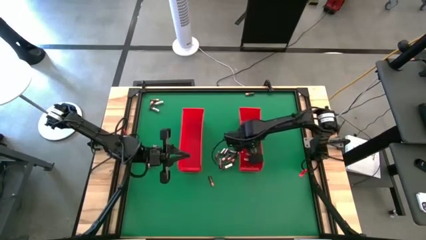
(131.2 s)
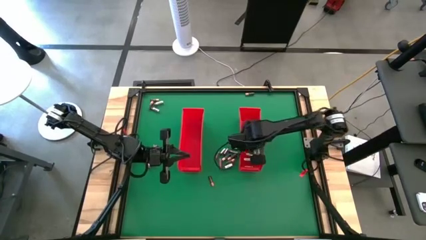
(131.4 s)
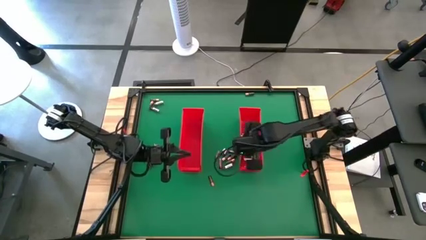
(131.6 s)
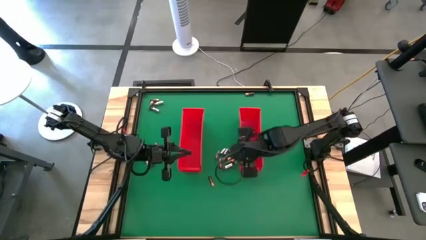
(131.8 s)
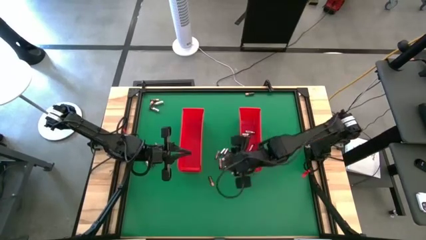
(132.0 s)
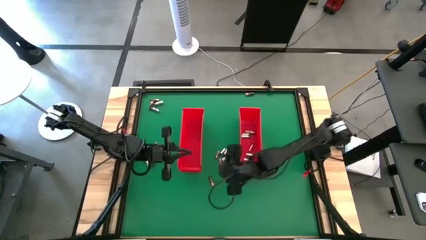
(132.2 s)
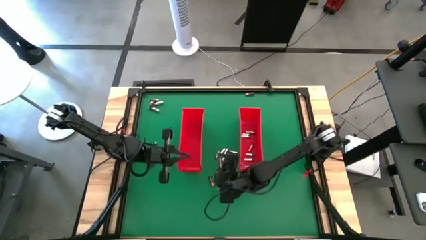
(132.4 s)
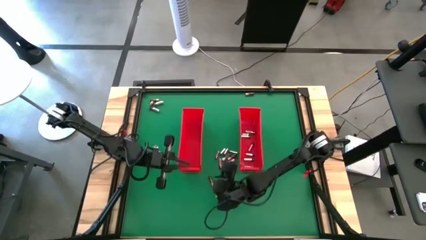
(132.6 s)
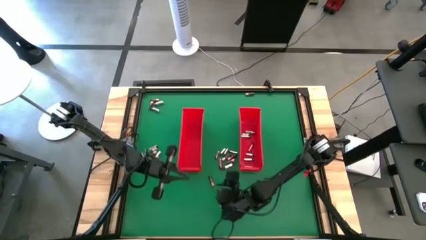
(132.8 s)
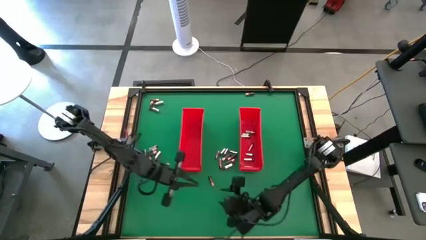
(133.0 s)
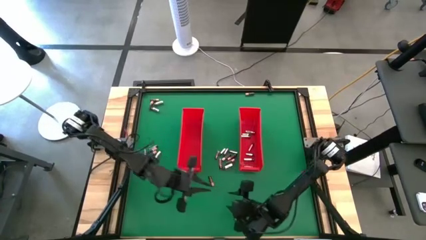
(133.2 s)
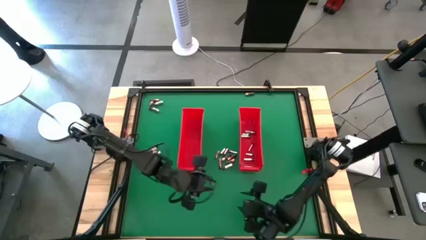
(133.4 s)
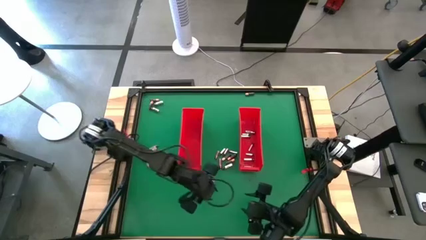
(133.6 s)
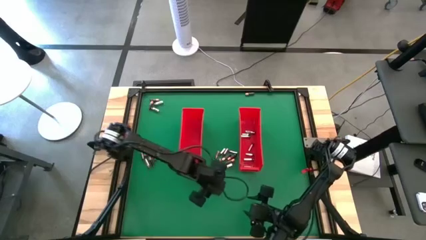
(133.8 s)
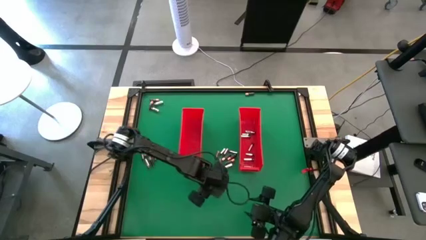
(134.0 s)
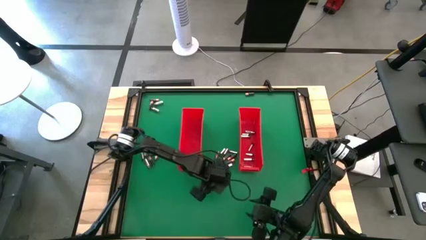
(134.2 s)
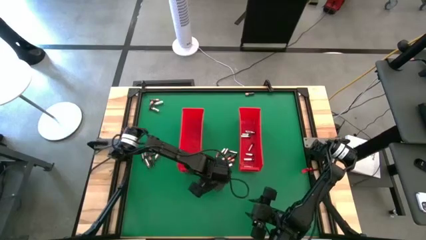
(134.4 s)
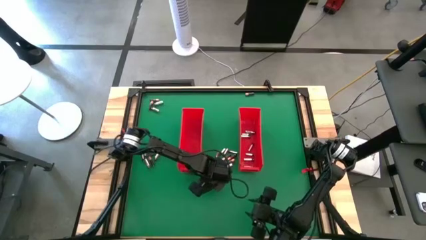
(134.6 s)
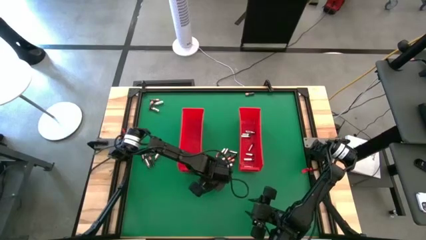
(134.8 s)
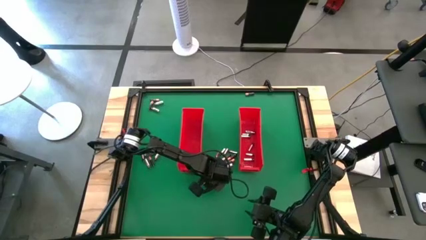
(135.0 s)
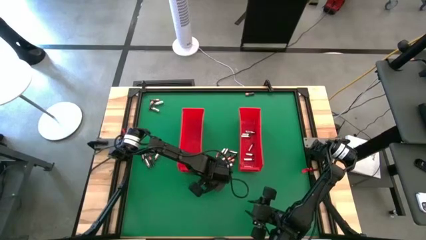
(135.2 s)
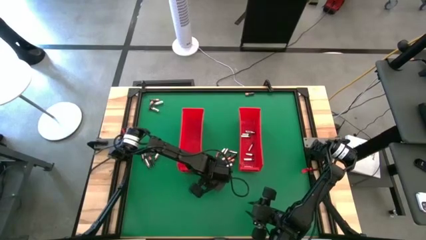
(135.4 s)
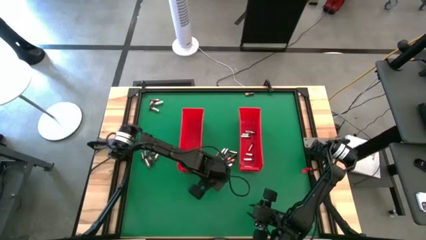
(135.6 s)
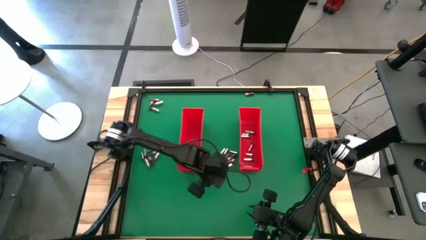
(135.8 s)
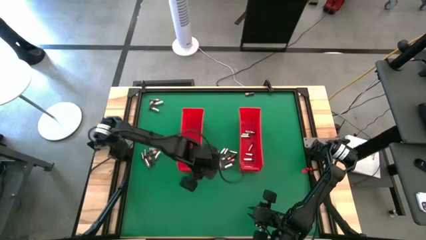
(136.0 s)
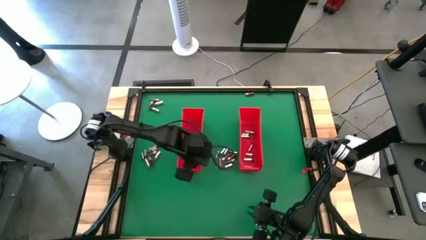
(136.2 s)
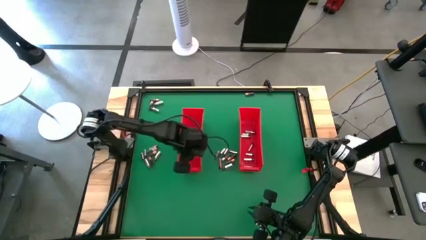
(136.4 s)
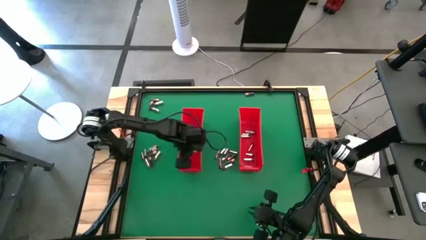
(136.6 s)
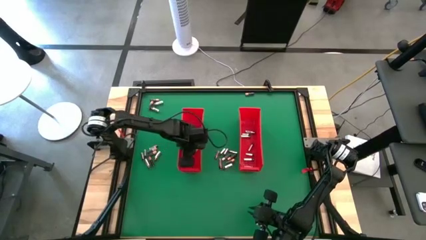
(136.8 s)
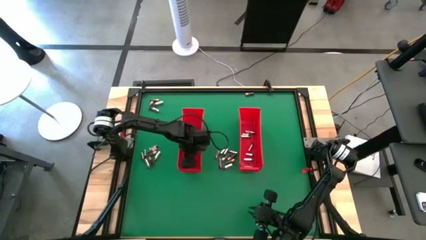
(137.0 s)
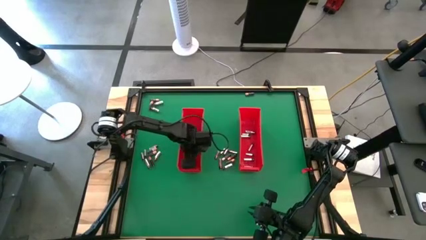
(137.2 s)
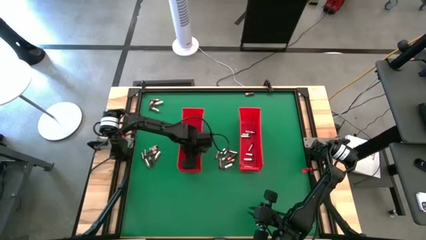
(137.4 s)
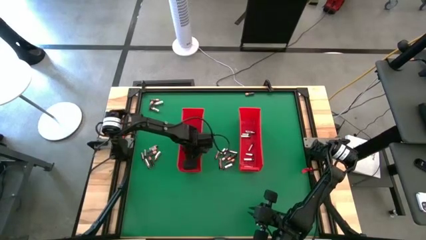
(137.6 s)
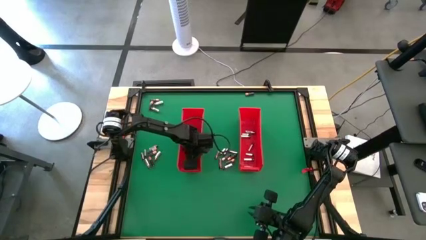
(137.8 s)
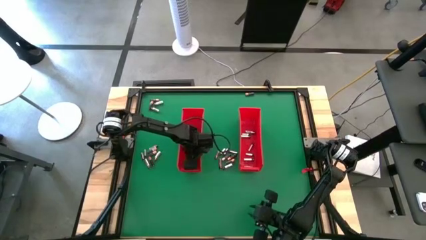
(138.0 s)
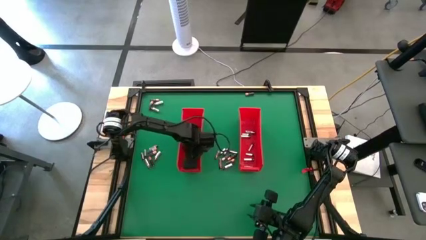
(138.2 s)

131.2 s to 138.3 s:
Task: Sort batteries
Put the brown battery into the left red bin

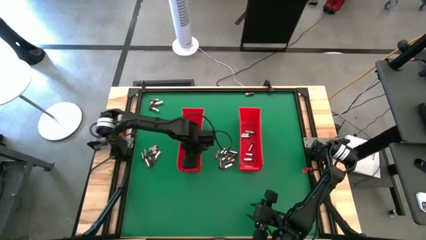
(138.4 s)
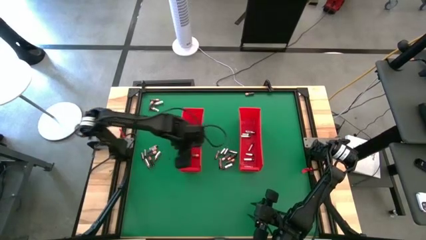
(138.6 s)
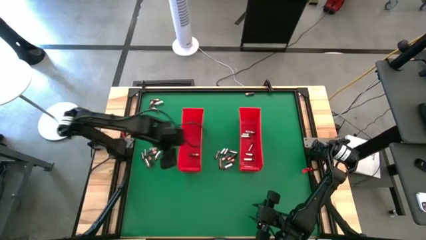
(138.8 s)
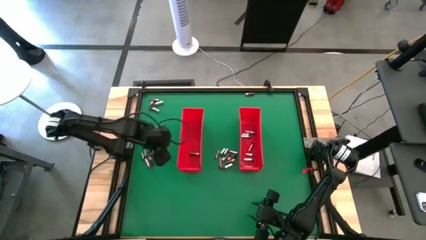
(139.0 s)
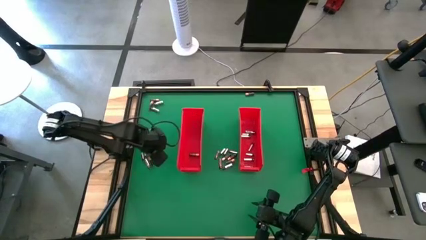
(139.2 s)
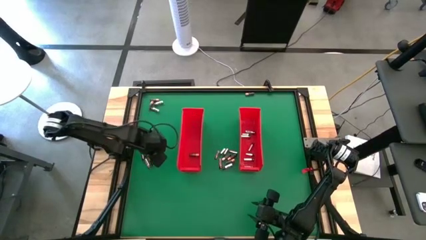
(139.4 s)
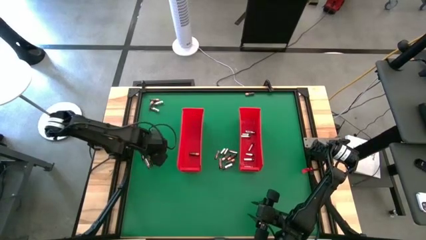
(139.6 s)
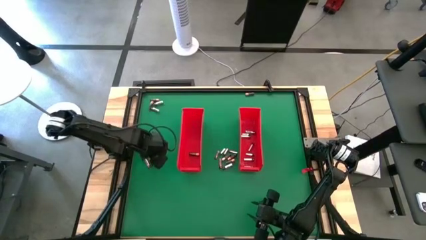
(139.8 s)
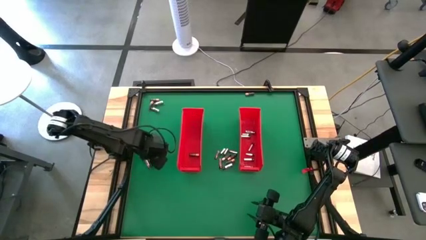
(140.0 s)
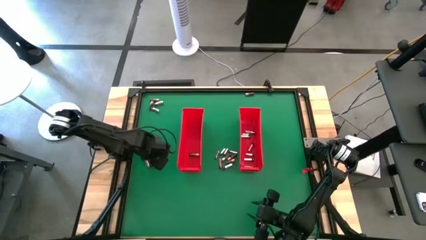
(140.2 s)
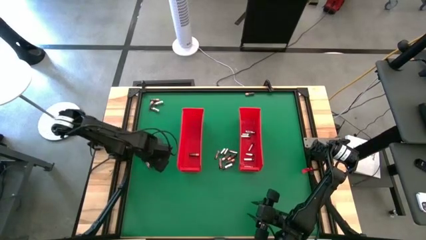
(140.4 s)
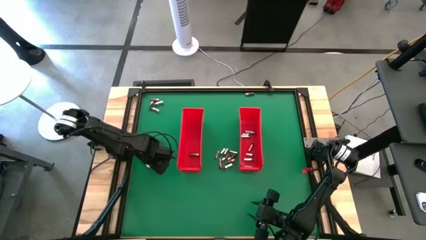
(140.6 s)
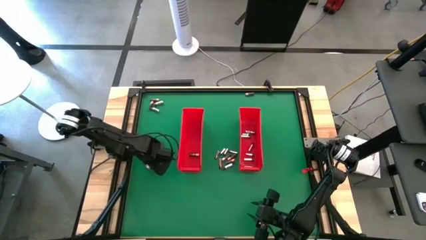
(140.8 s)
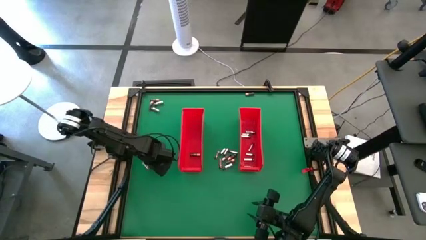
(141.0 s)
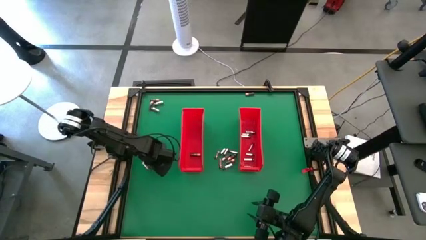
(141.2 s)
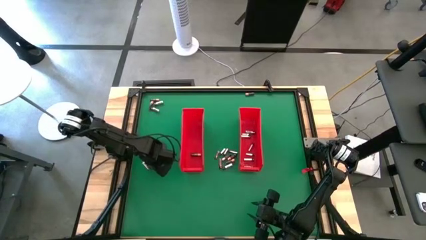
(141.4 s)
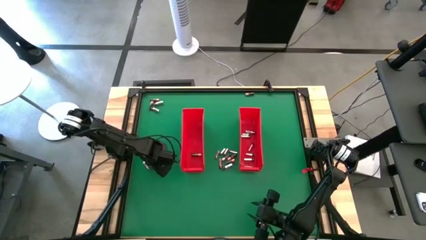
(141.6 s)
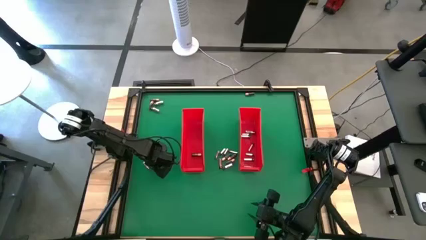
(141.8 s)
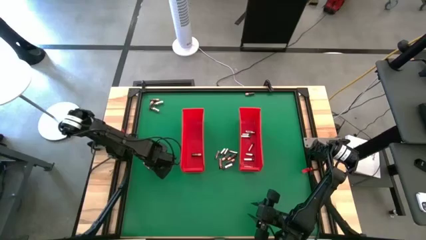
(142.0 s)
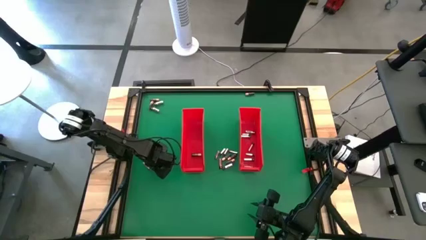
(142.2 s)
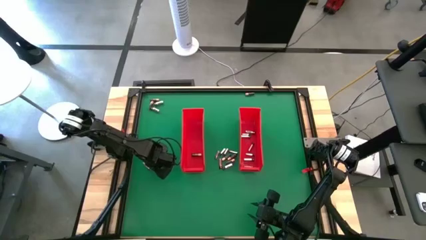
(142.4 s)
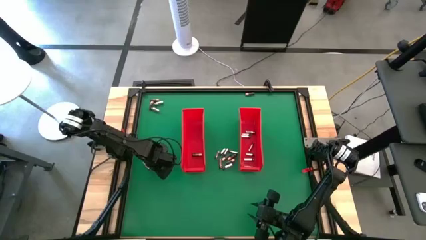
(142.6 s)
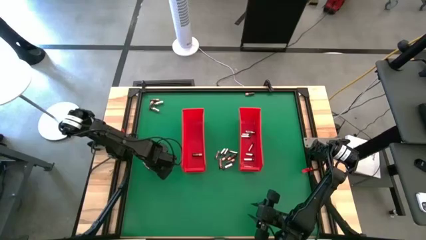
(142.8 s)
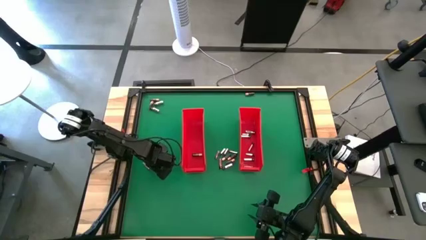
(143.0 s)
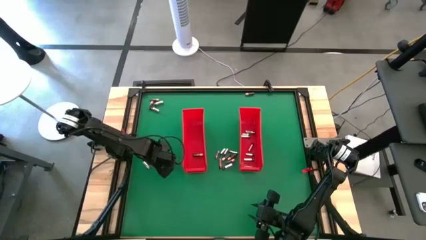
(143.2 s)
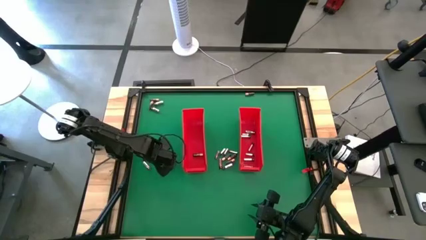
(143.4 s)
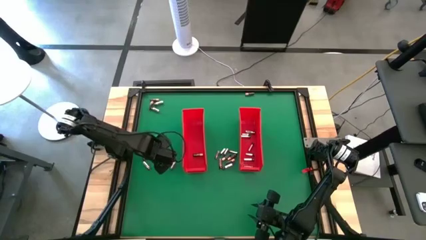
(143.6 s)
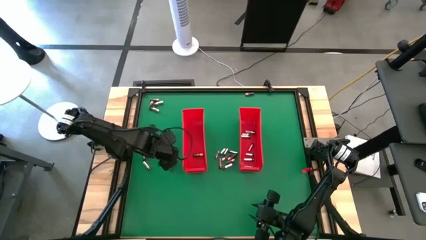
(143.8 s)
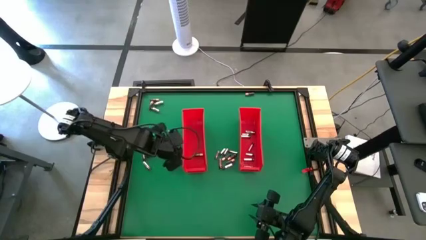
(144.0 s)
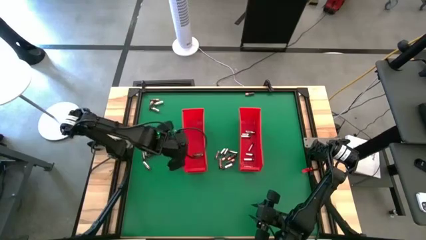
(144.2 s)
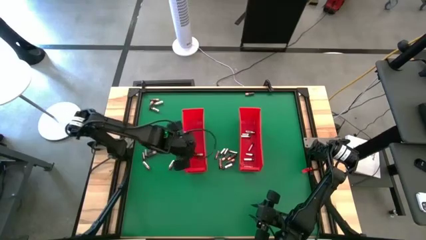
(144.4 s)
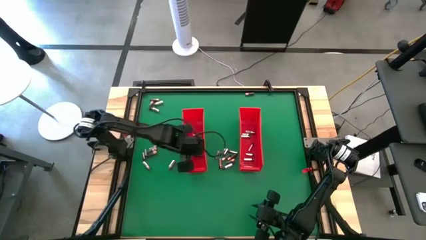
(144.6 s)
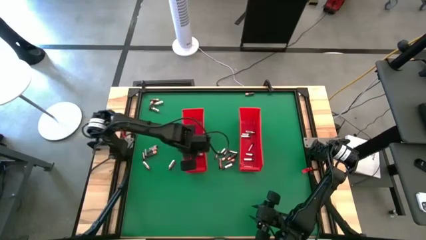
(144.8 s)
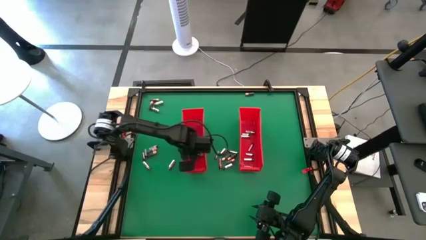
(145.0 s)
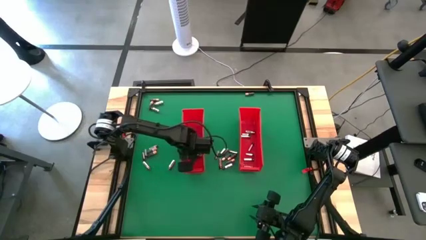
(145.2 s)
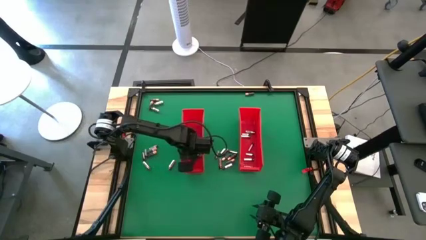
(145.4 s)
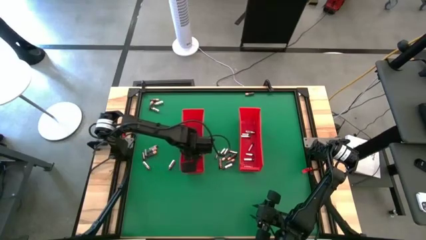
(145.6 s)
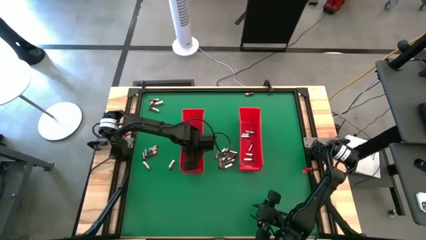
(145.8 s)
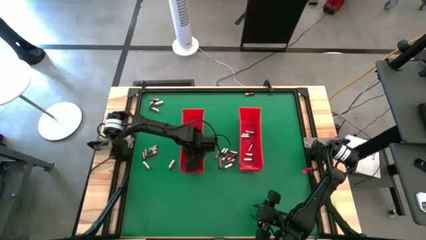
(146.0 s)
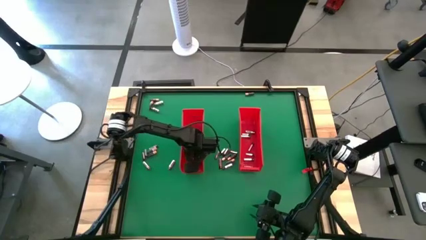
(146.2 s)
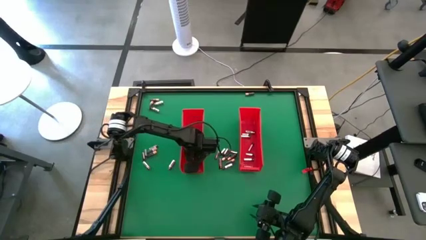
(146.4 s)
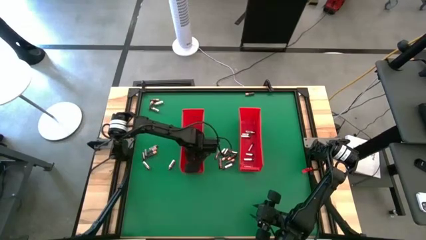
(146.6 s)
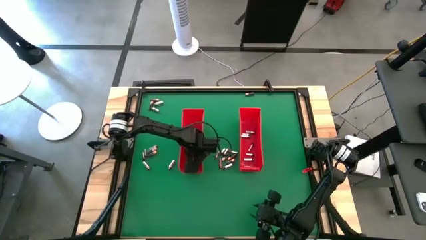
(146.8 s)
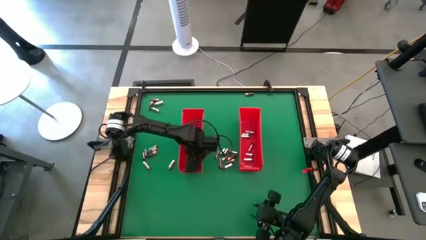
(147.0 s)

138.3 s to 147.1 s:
Put the brown battery into the left red bin
